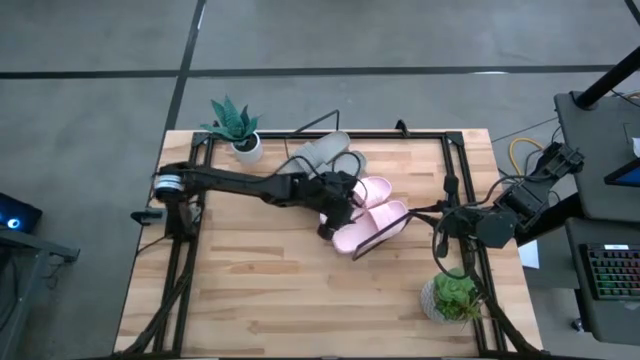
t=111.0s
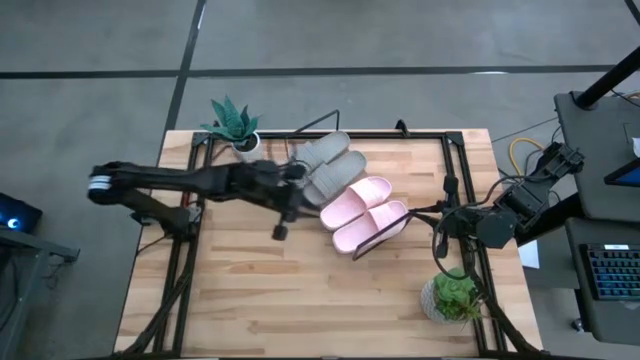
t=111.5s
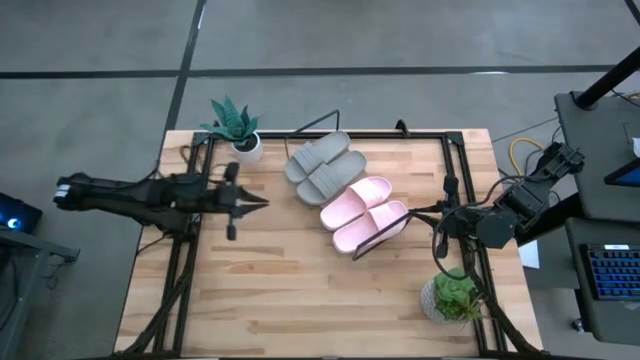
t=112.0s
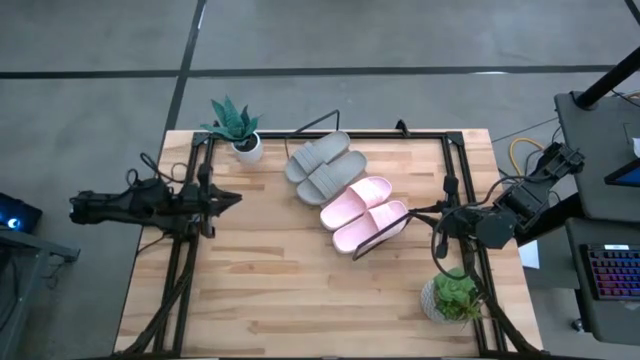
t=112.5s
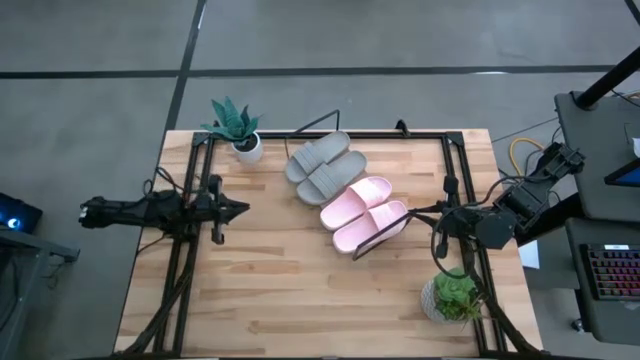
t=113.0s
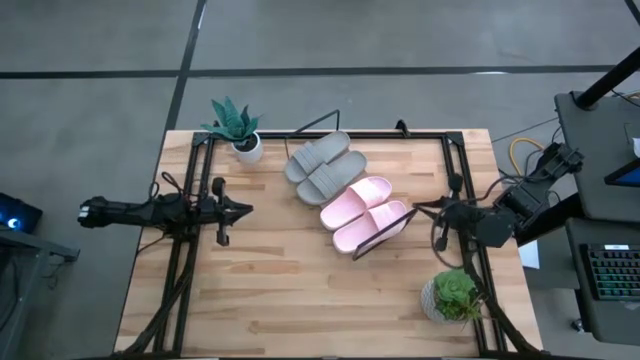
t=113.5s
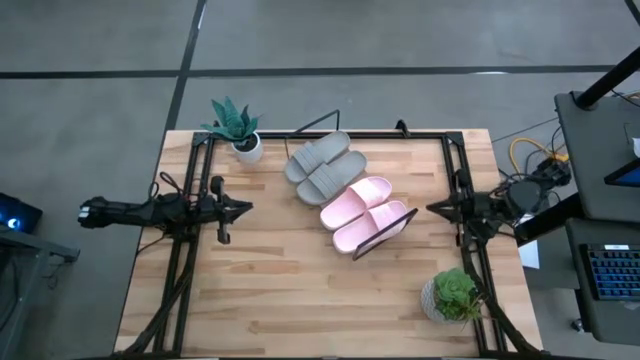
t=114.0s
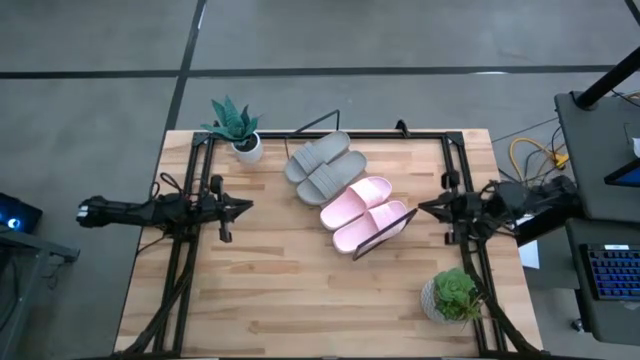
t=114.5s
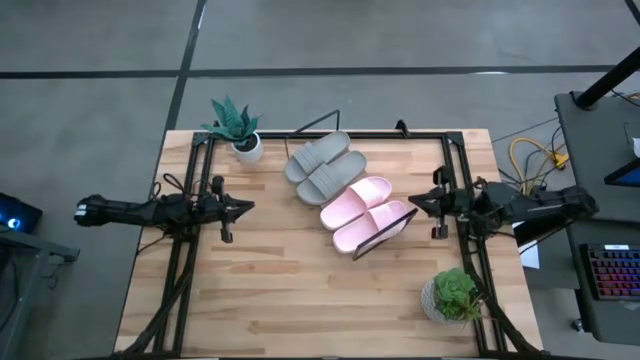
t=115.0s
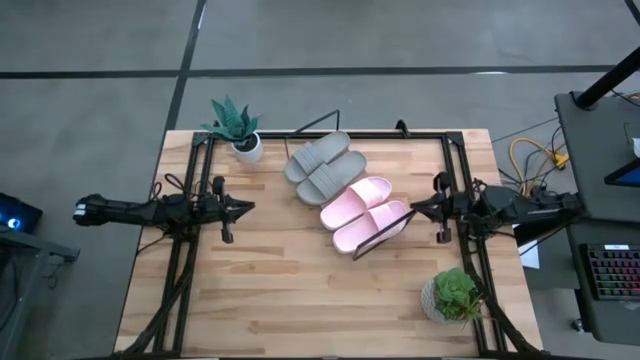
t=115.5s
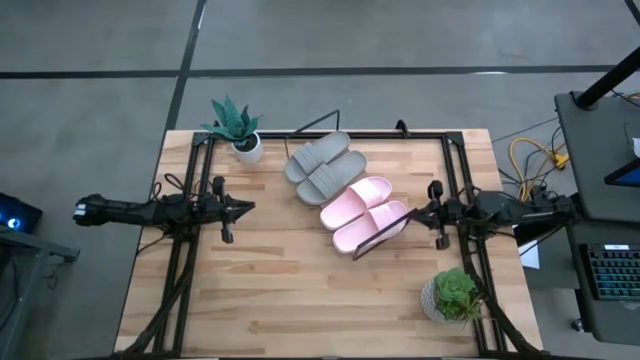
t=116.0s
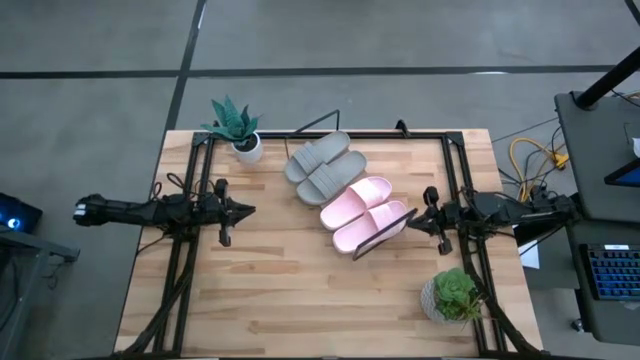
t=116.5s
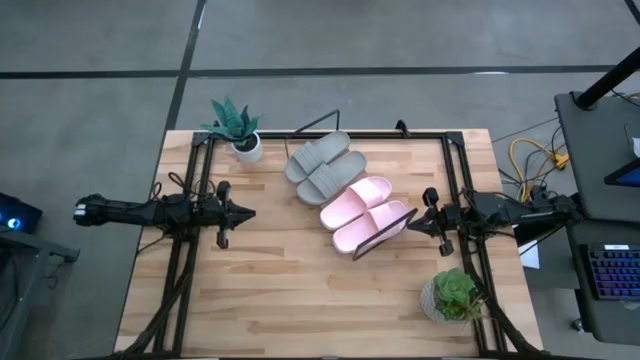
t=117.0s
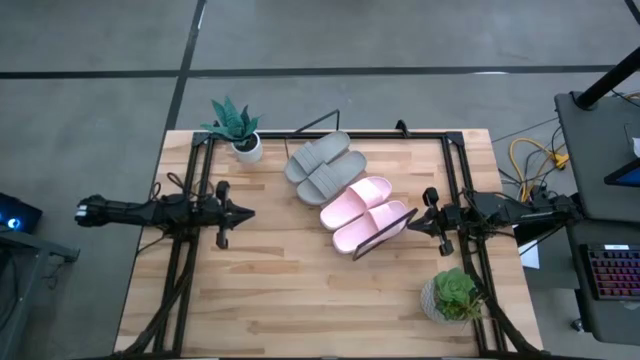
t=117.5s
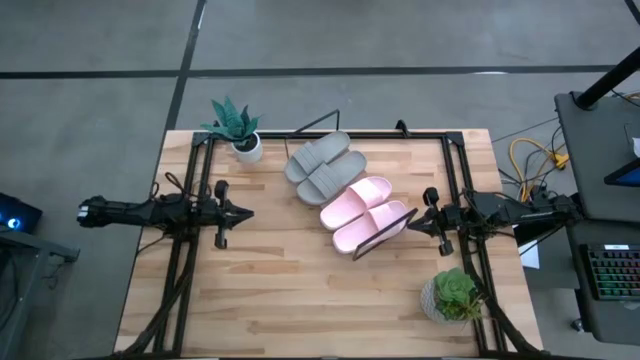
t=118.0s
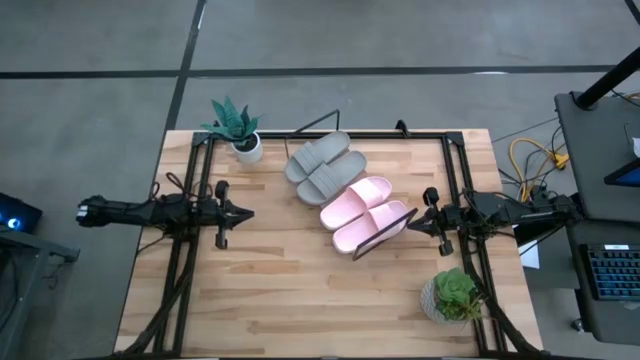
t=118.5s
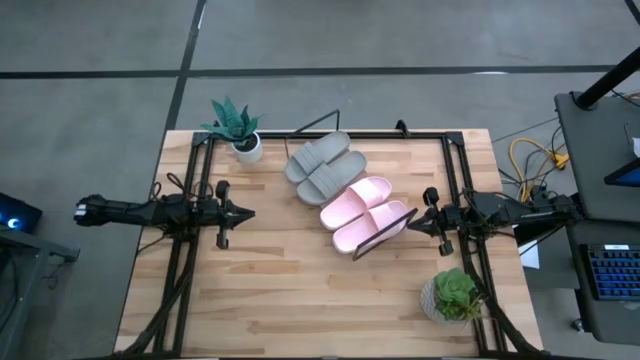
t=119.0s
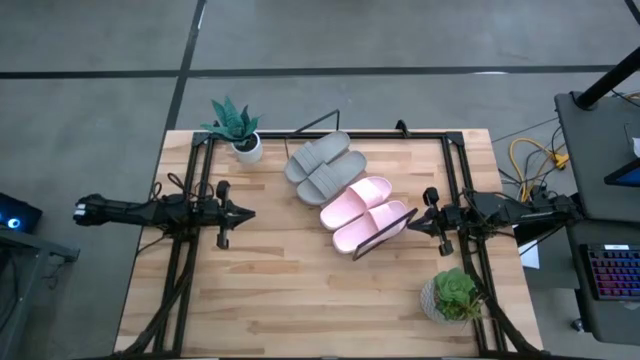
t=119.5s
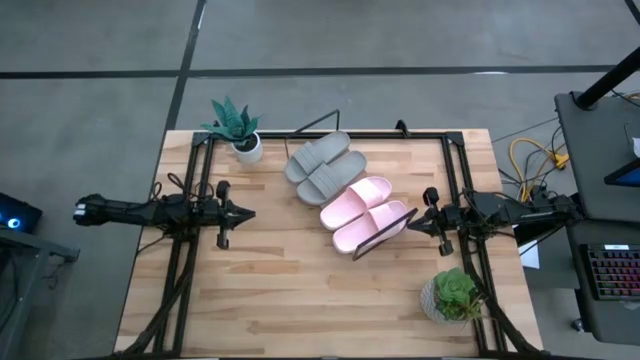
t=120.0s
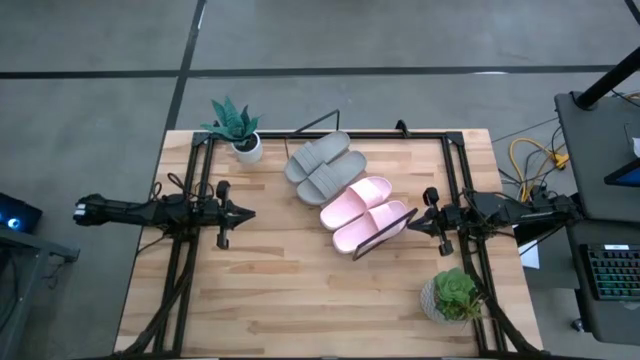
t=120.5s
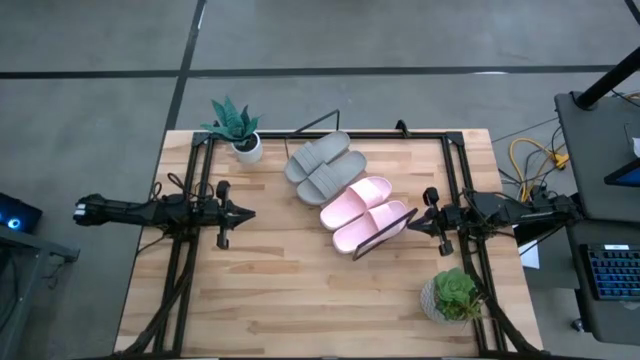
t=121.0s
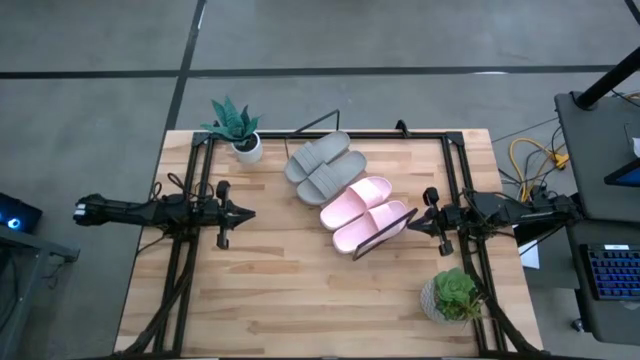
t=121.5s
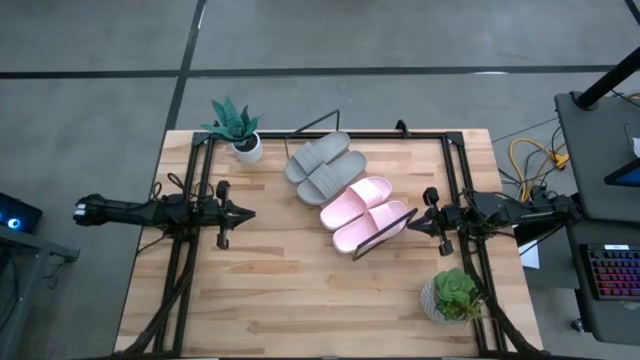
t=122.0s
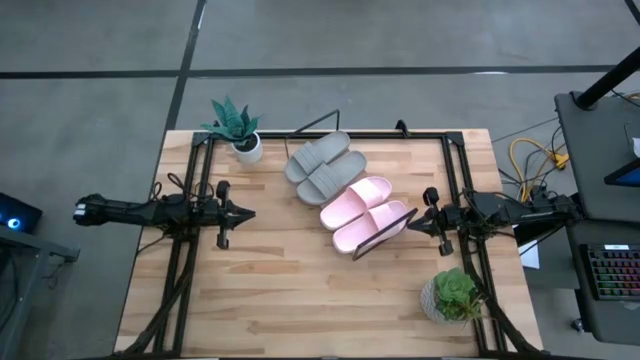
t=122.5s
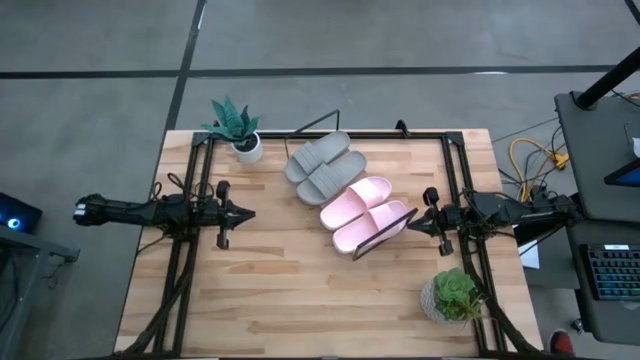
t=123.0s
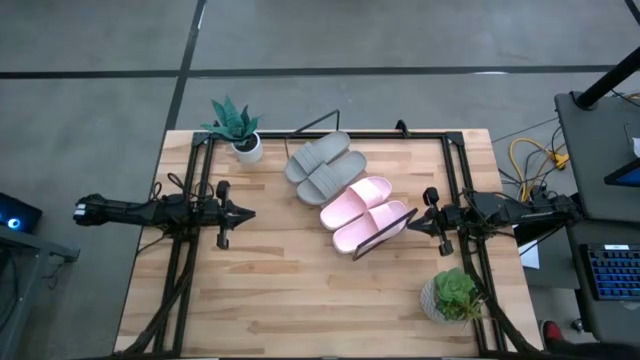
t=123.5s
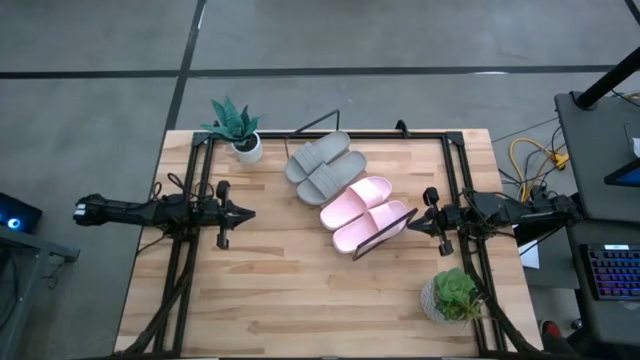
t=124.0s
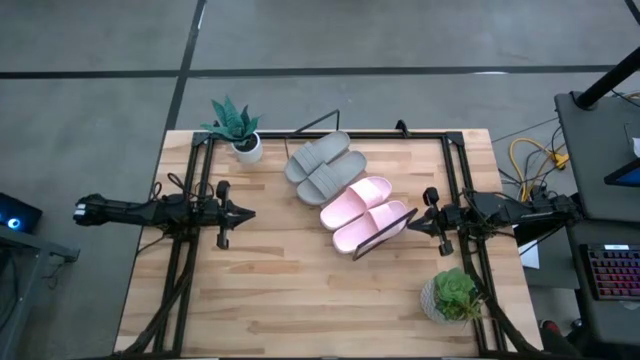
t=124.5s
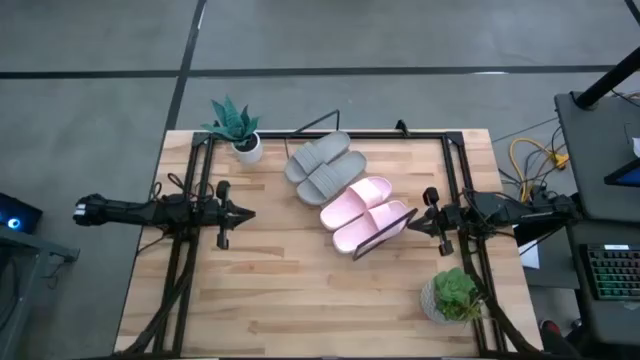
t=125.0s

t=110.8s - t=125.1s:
Task: Pick and place slides into the shelf
Return to Home Position

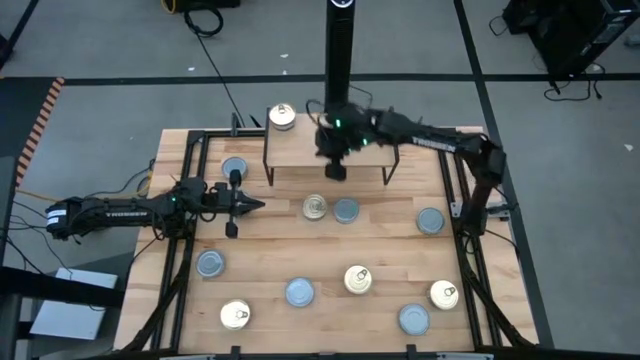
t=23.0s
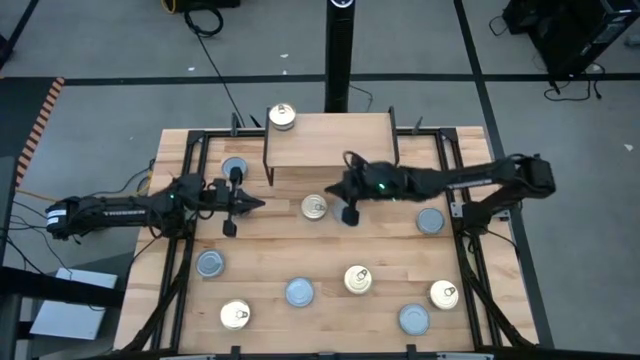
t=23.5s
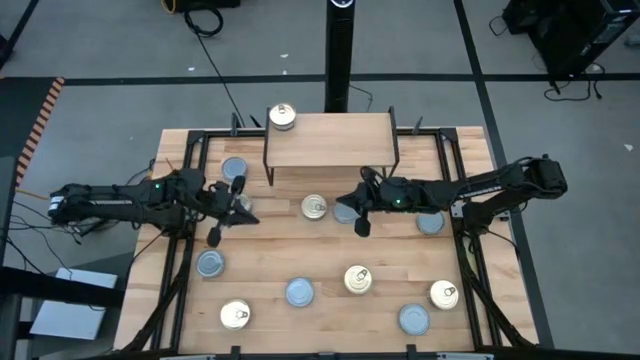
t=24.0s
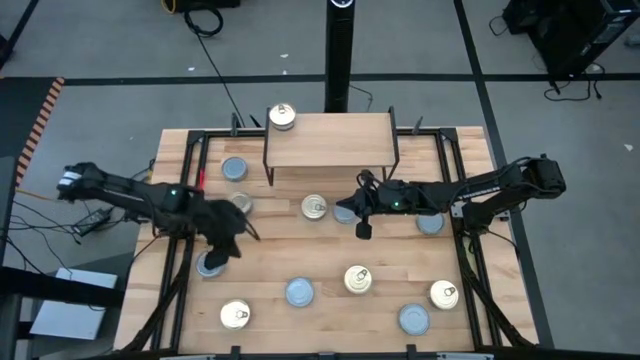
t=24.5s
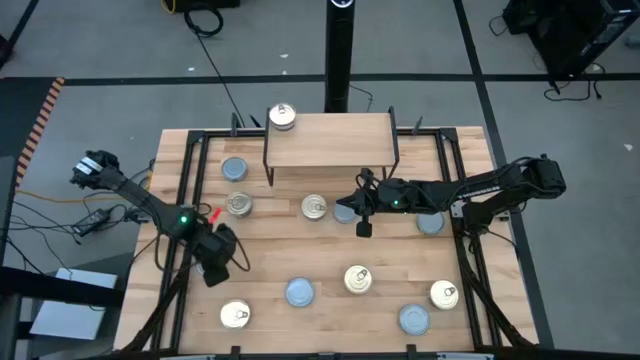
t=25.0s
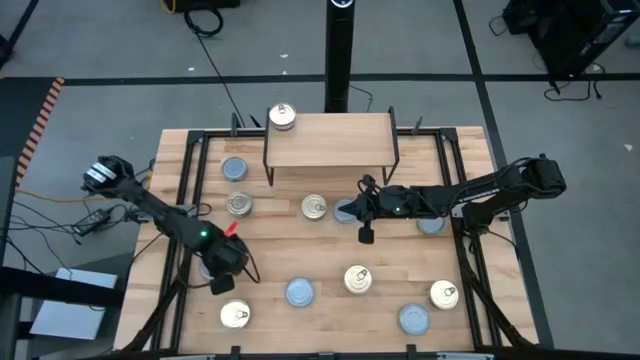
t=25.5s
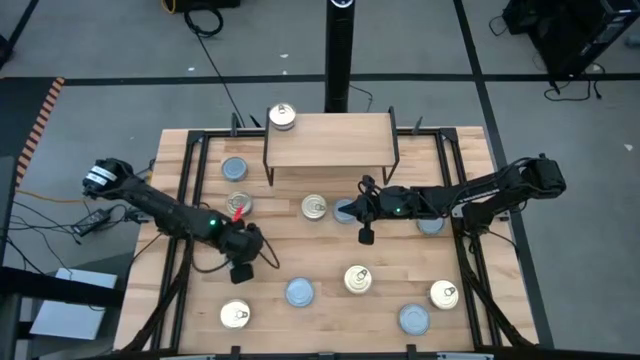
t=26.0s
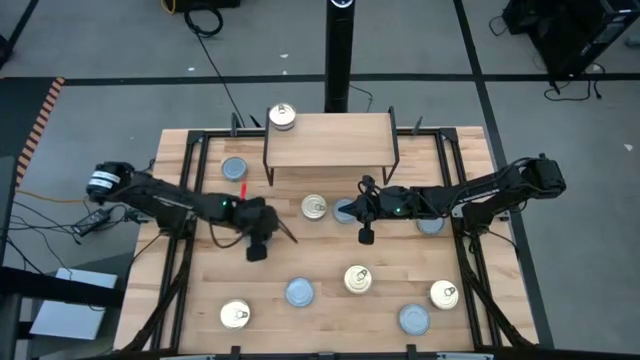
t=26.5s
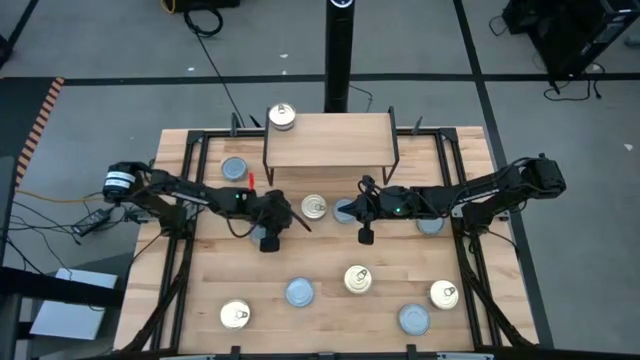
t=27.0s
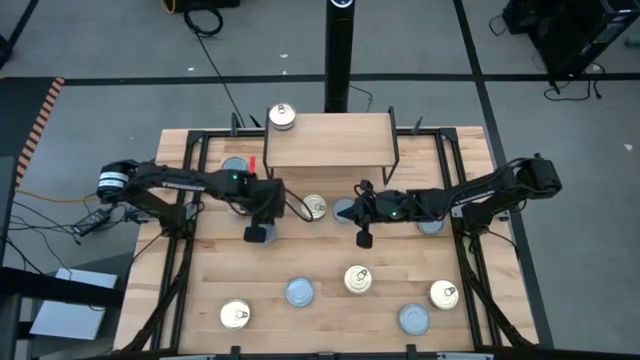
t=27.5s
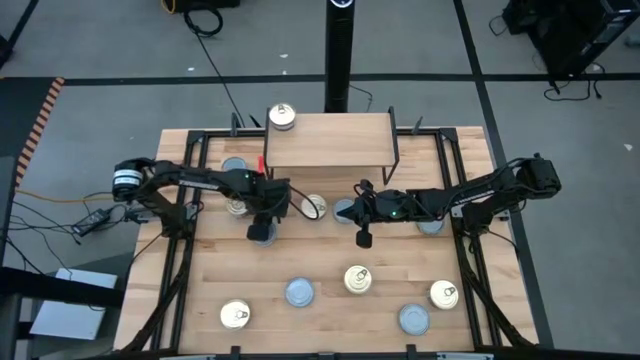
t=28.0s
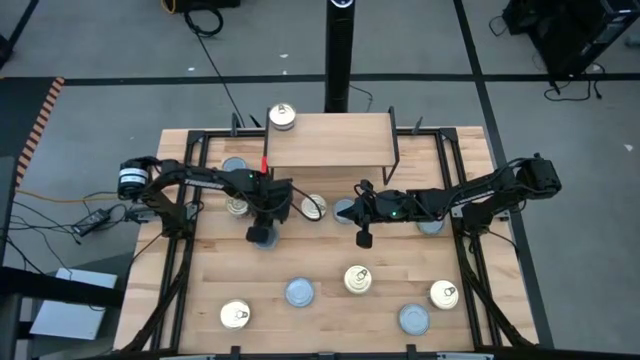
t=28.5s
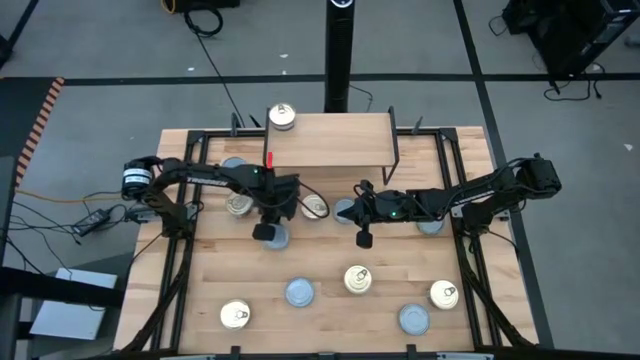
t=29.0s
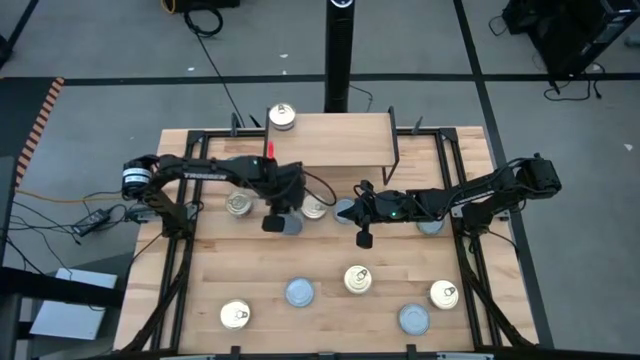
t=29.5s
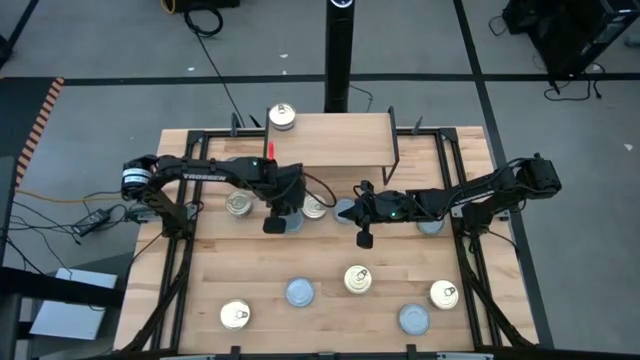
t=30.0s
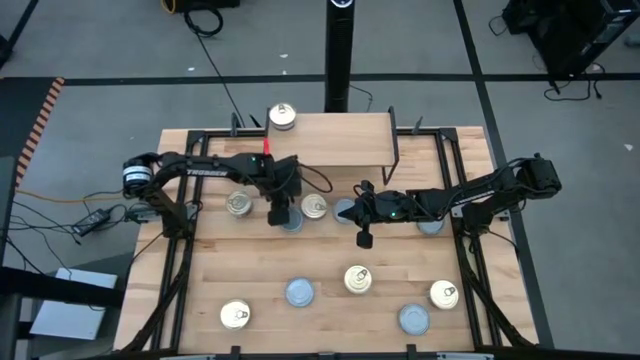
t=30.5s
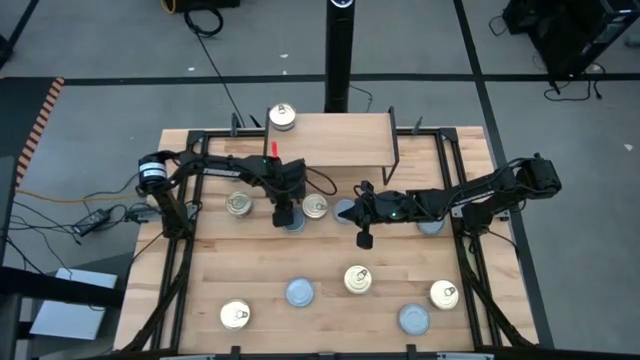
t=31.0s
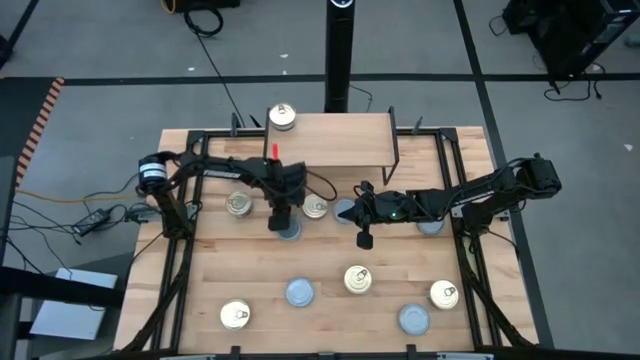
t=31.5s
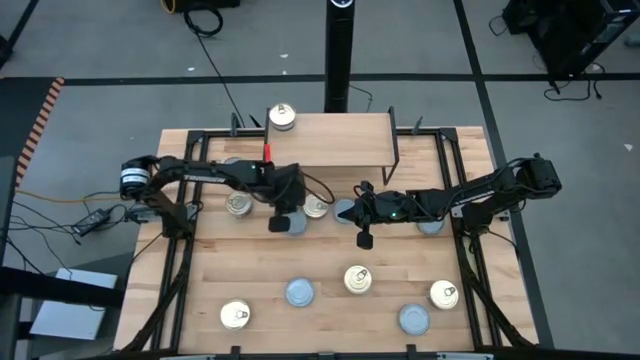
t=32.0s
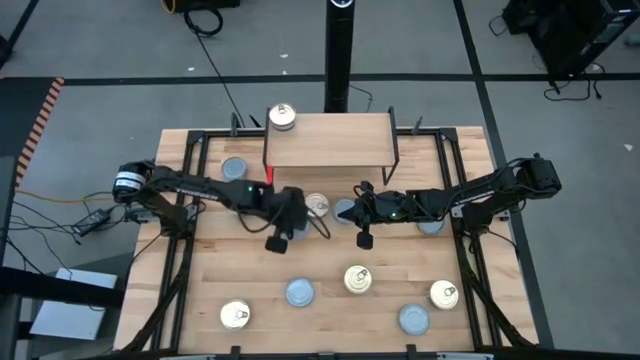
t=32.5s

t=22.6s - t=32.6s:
Task: Stack canned seafood by type on shelf
Put the green tuna can on the shelf
